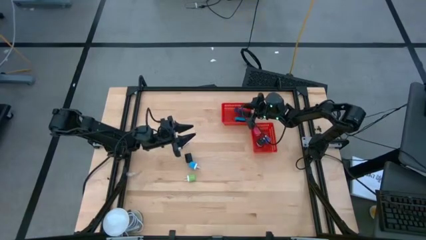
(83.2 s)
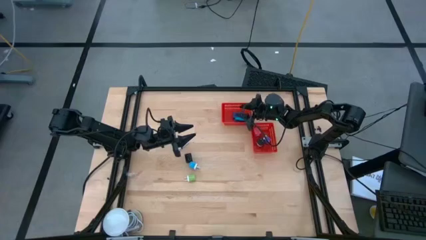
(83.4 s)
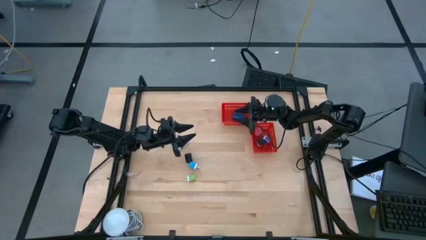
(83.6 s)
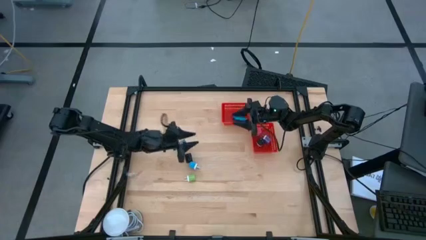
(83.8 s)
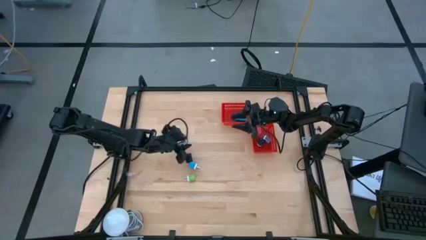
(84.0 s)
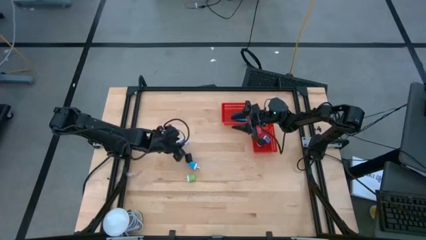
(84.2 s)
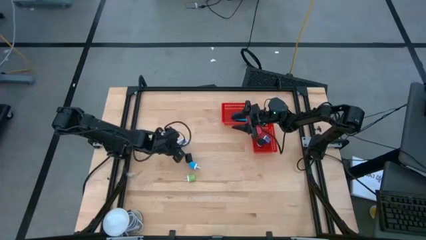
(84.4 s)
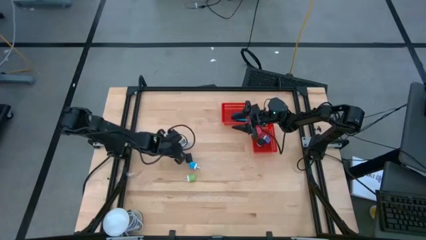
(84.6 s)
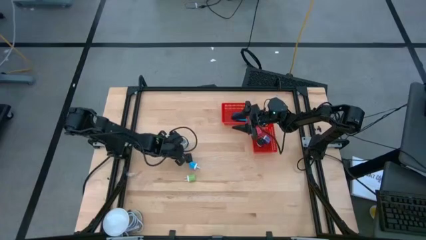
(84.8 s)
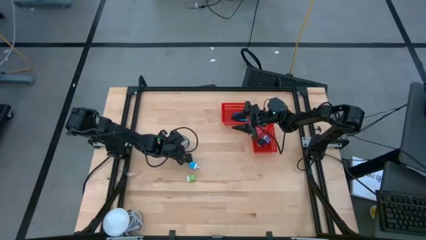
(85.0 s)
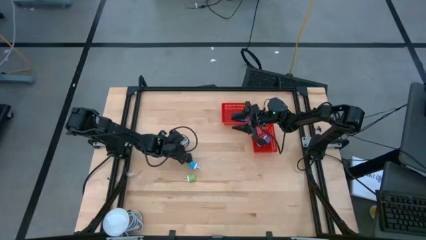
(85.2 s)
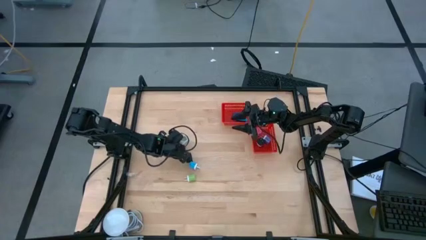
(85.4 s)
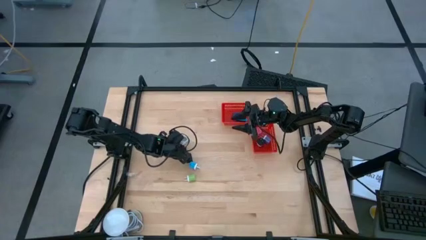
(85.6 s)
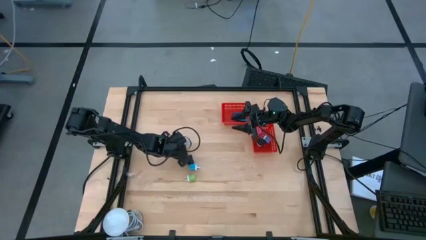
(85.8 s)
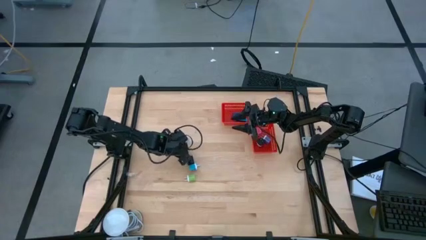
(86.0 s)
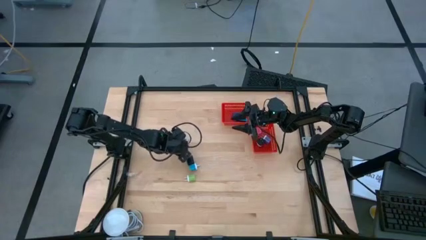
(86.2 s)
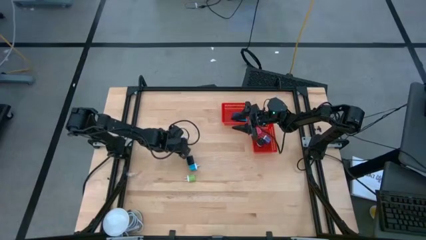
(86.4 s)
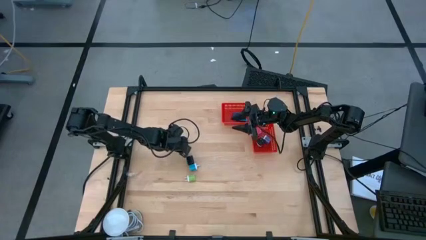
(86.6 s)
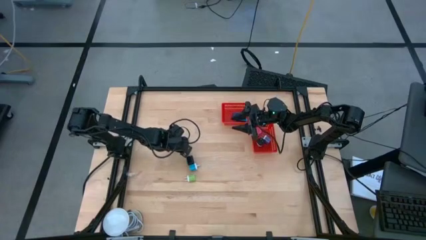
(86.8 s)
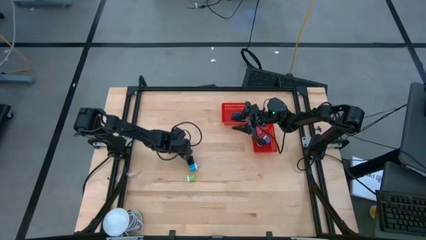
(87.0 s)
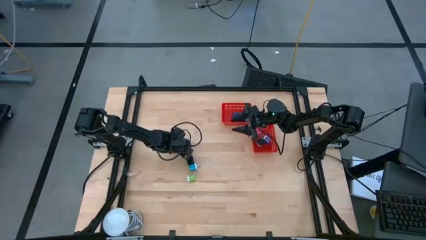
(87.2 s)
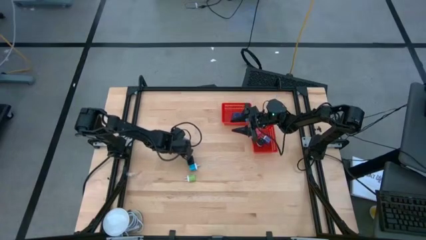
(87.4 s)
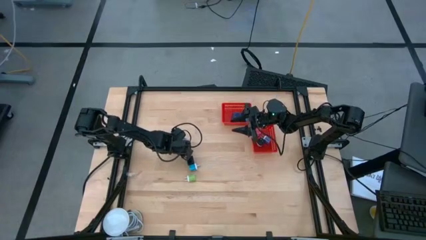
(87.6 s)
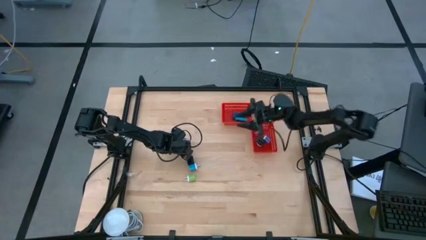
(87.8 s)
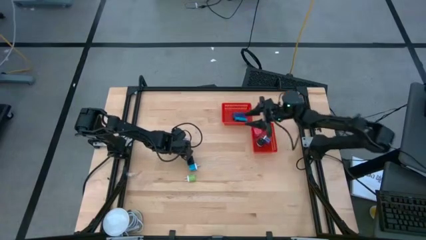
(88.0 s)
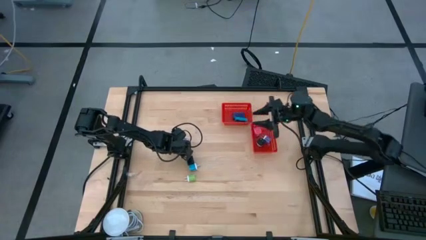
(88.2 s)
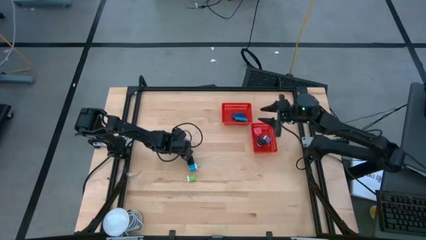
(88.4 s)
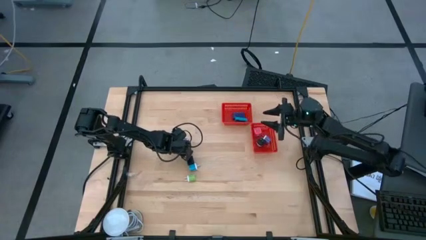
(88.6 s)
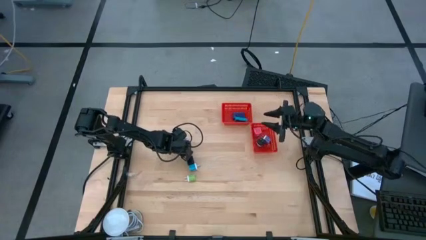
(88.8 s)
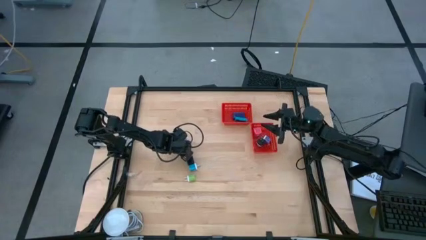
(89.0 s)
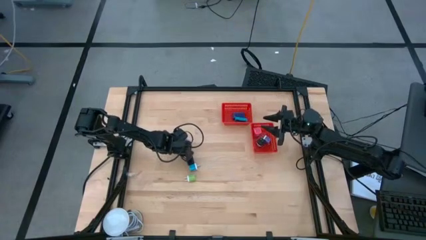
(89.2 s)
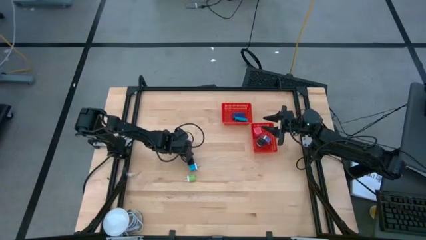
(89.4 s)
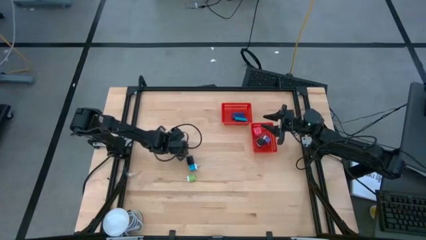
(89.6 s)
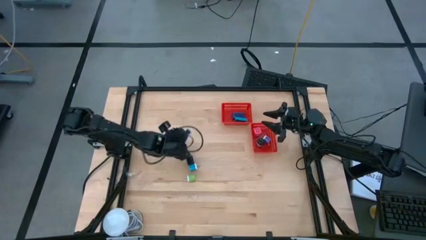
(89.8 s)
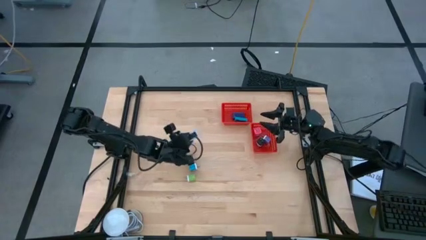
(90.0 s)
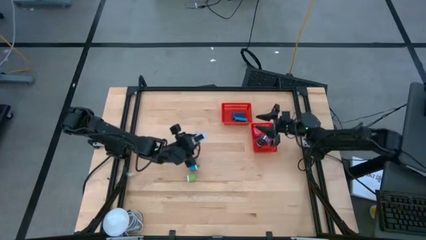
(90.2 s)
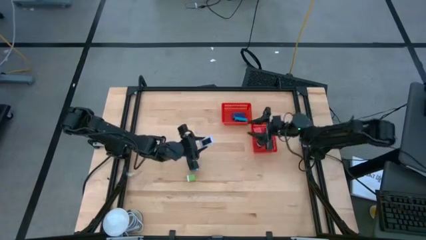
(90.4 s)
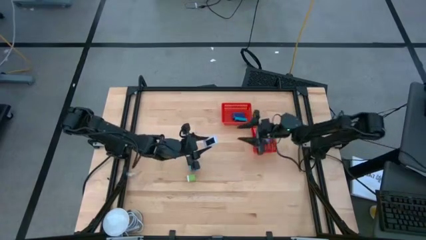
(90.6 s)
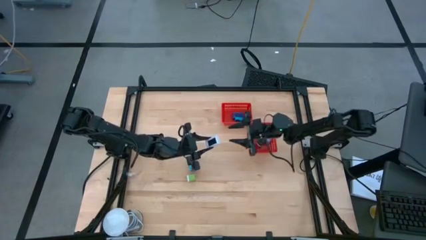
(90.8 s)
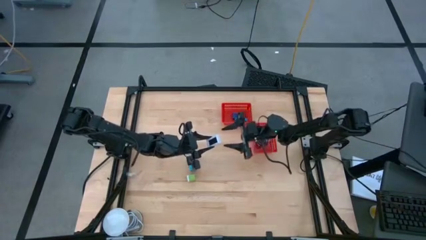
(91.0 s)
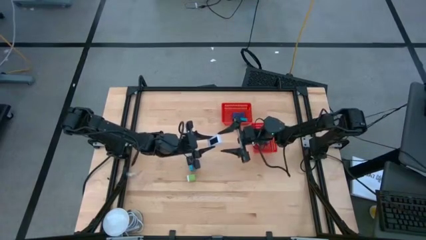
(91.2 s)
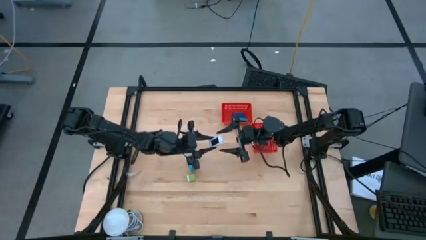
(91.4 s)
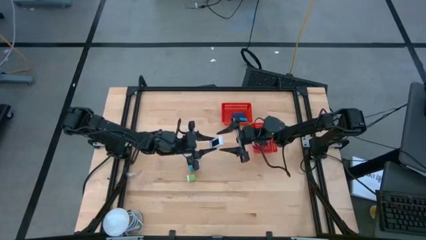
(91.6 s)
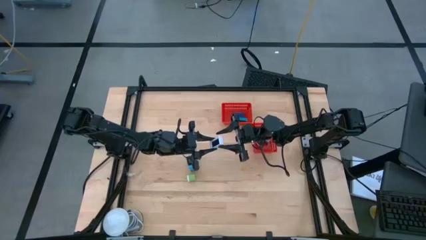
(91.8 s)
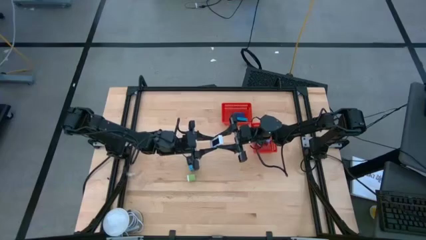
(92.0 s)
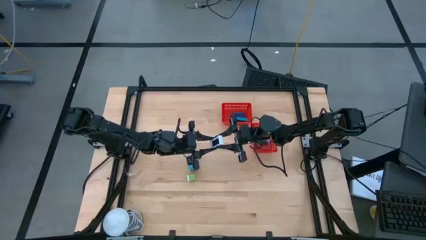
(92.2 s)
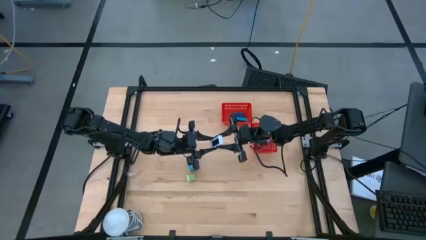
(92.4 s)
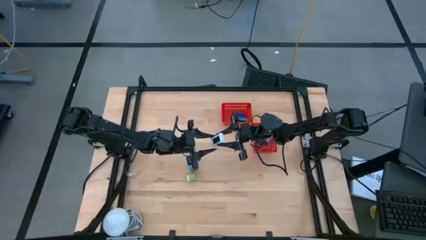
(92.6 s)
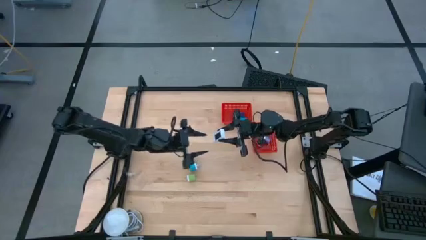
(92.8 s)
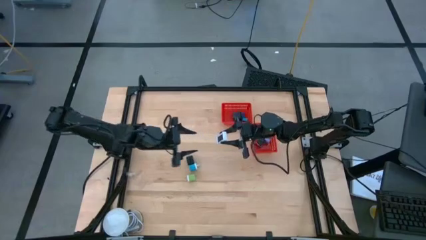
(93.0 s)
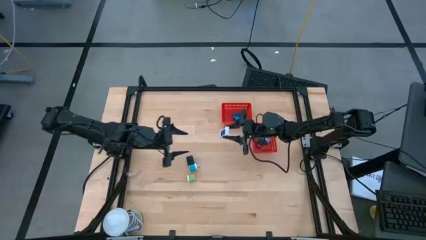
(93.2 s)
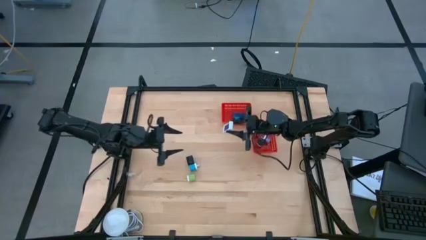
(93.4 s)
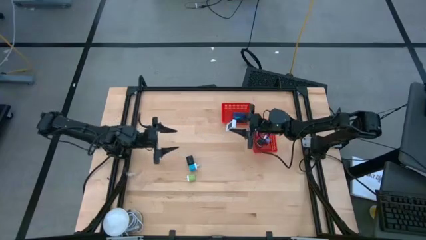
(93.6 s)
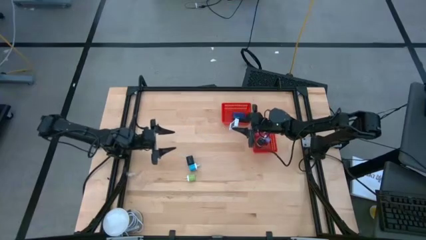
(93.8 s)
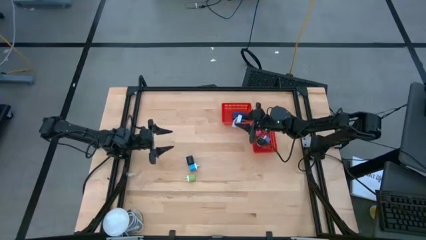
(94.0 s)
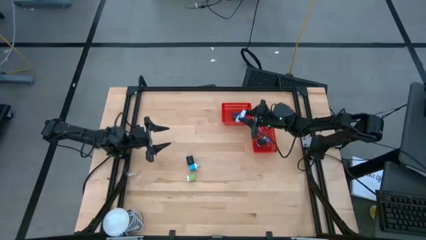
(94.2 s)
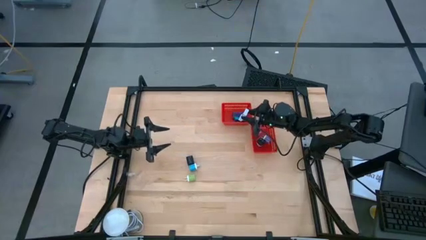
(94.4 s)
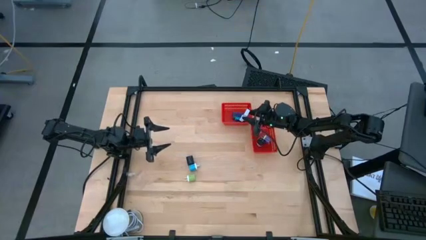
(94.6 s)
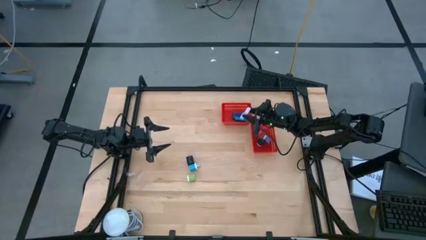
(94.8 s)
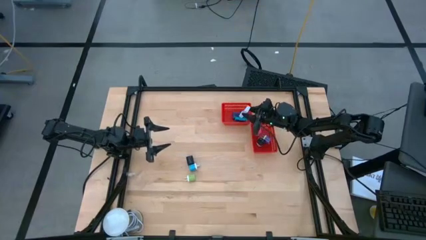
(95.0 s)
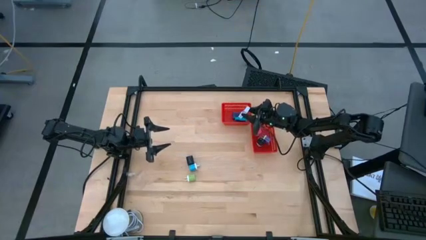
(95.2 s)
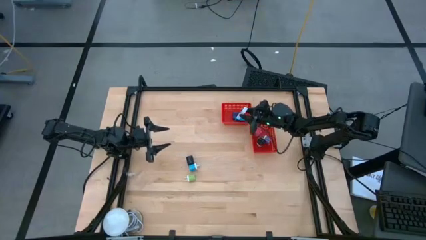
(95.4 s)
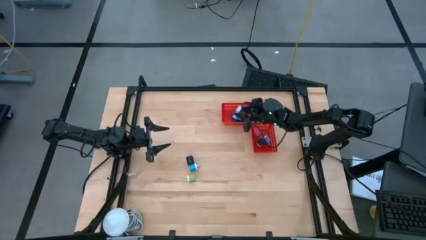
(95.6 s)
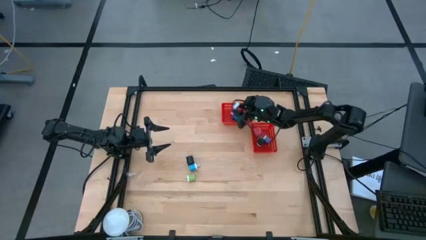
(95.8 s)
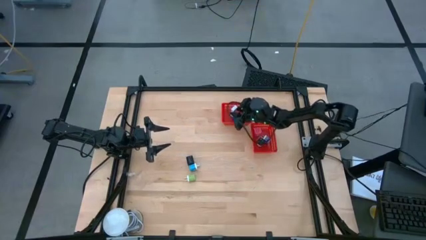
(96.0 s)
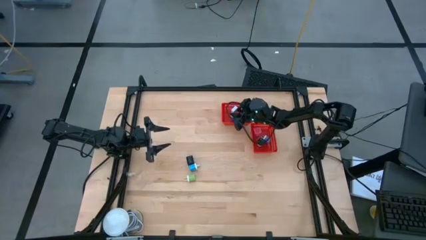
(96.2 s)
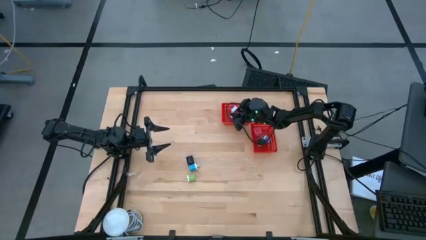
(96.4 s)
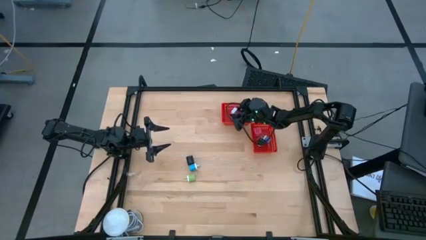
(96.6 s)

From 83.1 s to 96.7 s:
Task: Pick & Place Office items
Put the white digital clock into the top red bin

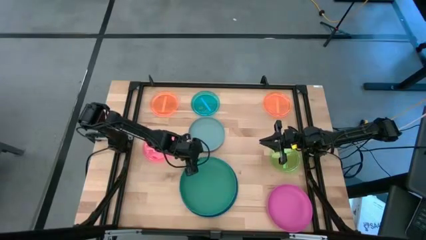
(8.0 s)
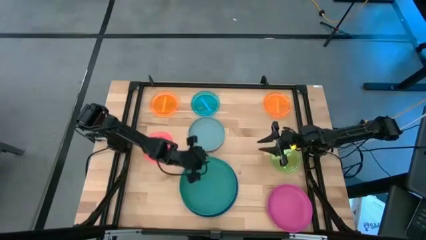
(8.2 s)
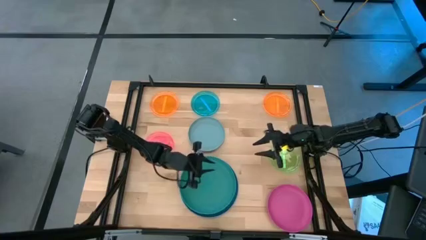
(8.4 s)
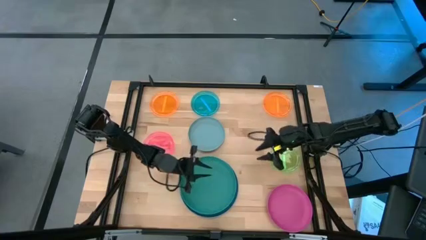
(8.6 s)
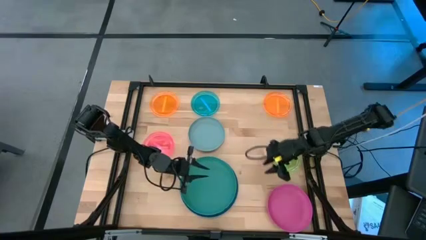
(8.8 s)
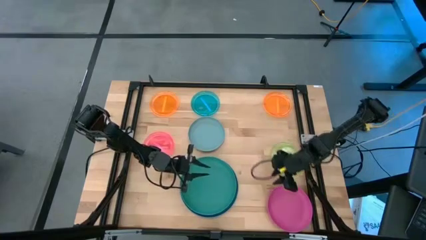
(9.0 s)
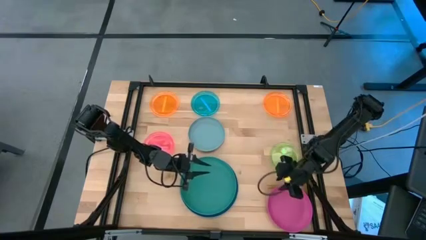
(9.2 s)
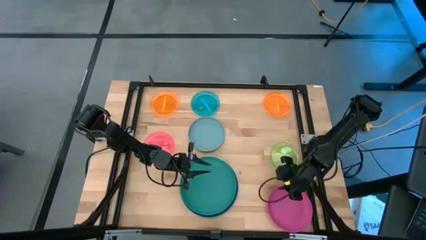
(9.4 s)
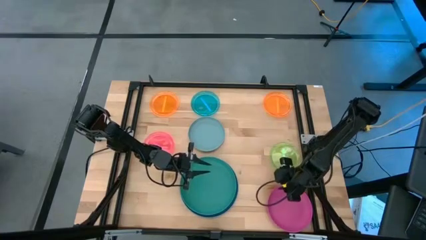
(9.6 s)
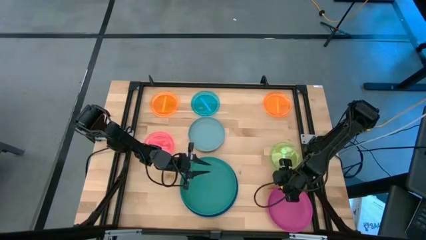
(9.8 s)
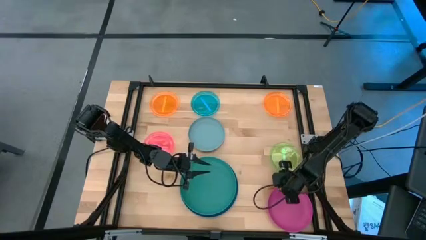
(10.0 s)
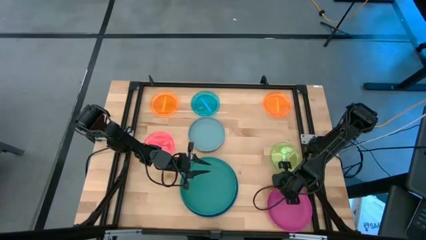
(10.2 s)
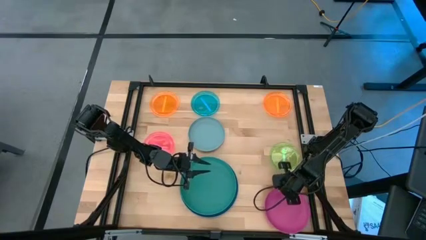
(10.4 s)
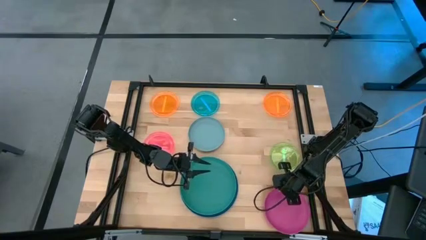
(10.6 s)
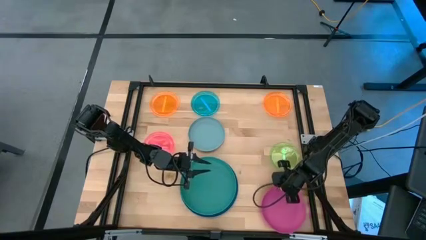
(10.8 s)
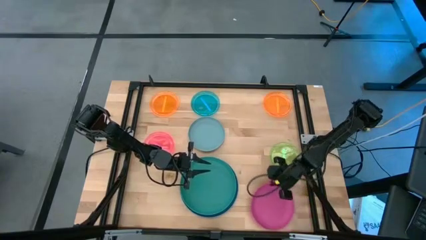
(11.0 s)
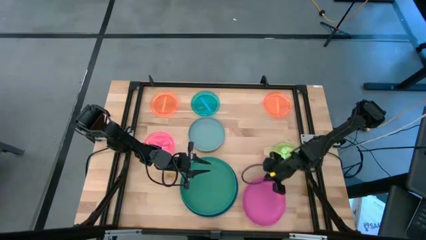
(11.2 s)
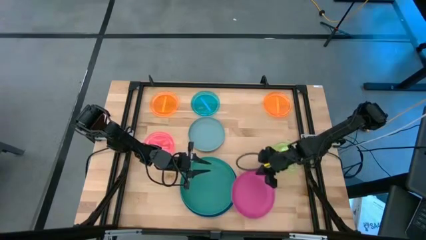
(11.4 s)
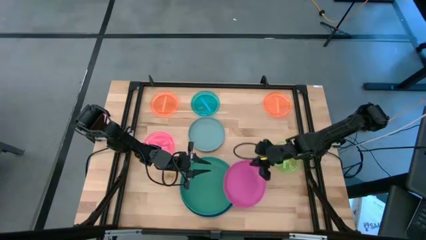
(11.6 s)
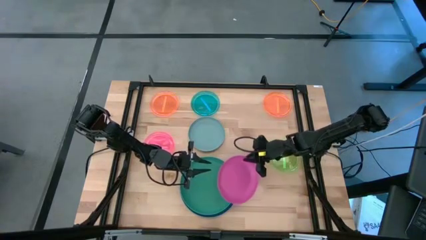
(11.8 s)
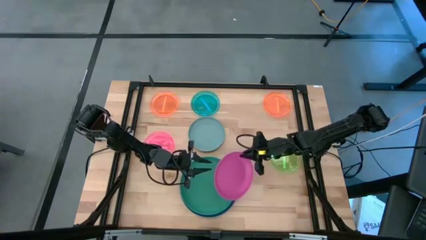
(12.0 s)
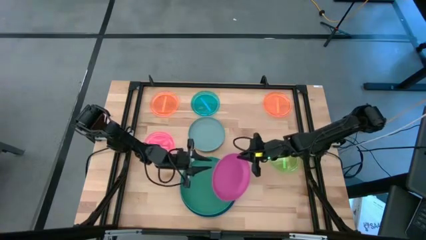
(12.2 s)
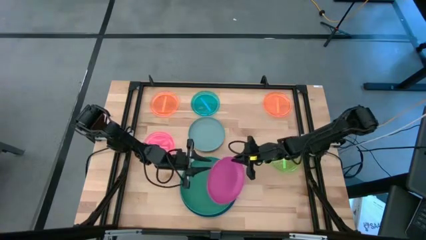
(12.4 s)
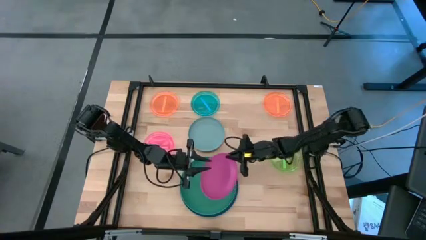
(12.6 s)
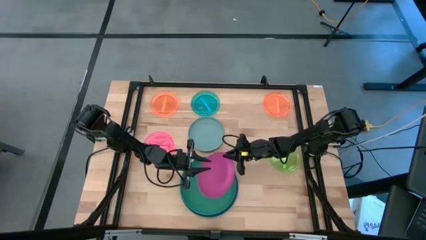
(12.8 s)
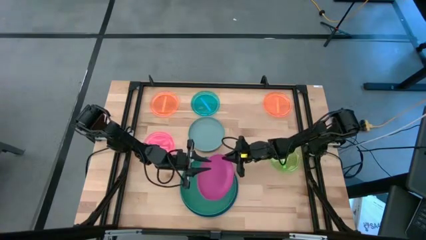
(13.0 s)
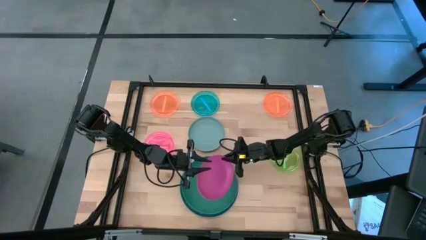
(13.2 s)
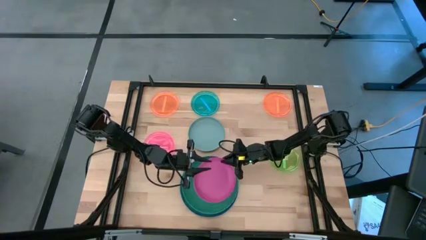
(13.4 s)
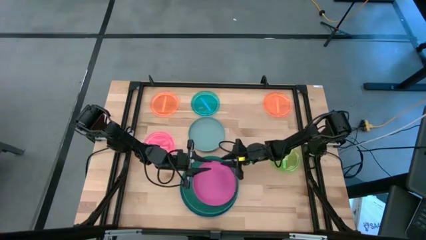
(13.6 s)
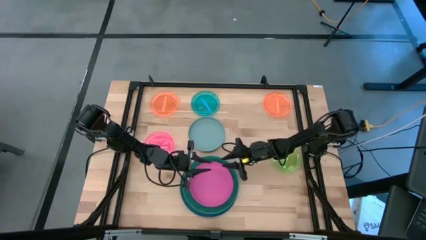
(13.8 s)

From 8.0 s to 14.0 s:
Task: Stack plastic plates
Stack the pink plate on the dark green plate
